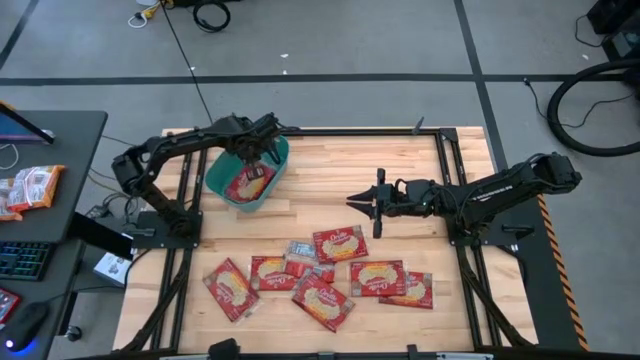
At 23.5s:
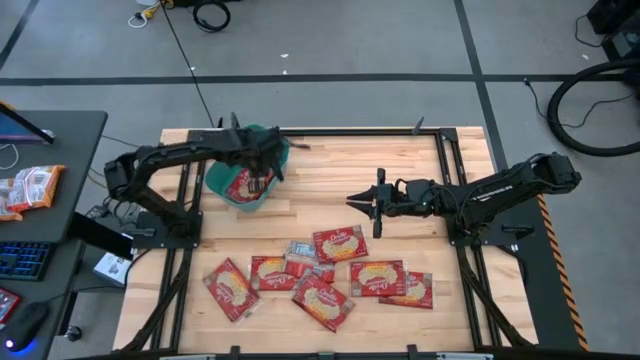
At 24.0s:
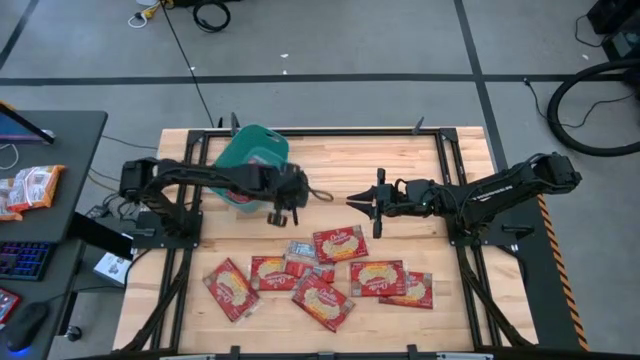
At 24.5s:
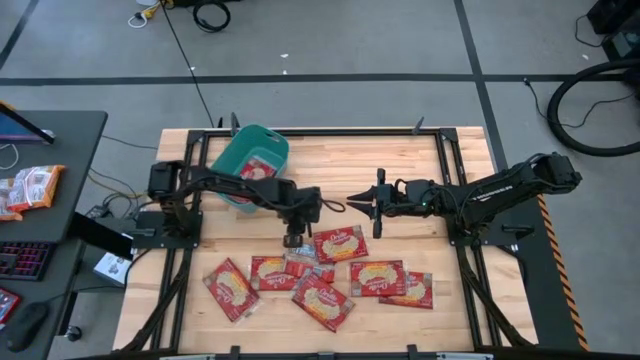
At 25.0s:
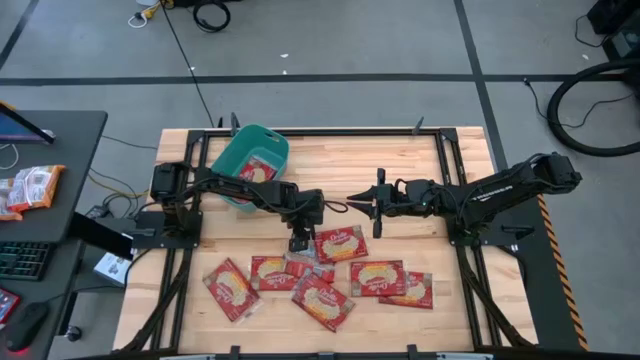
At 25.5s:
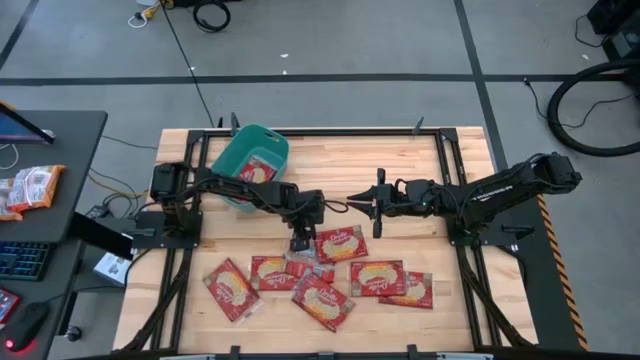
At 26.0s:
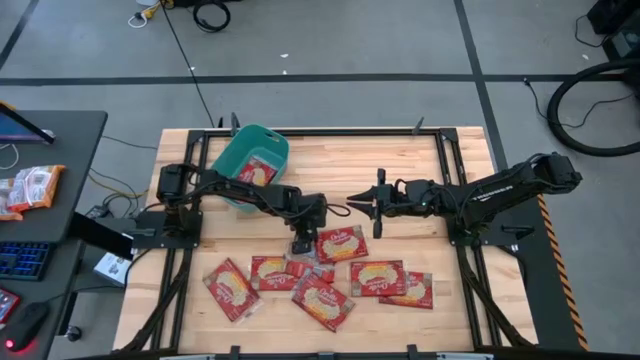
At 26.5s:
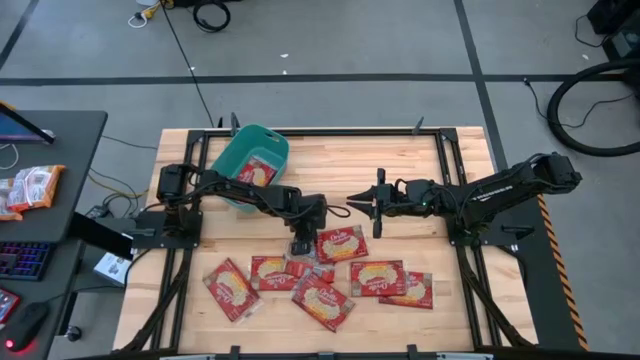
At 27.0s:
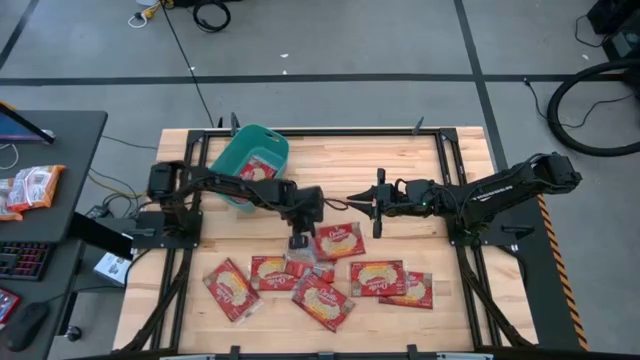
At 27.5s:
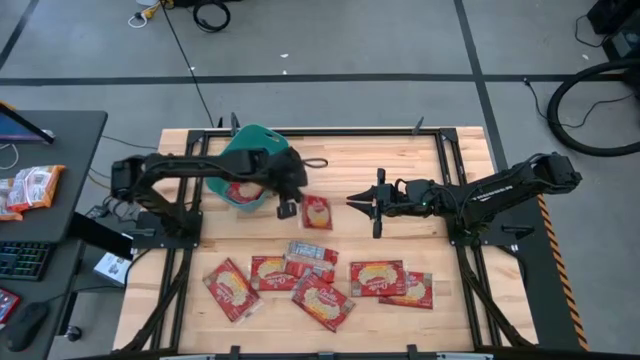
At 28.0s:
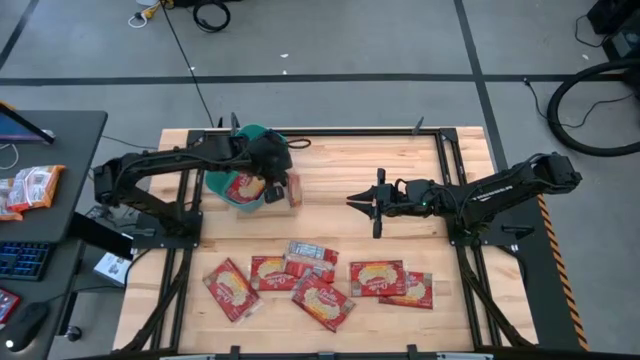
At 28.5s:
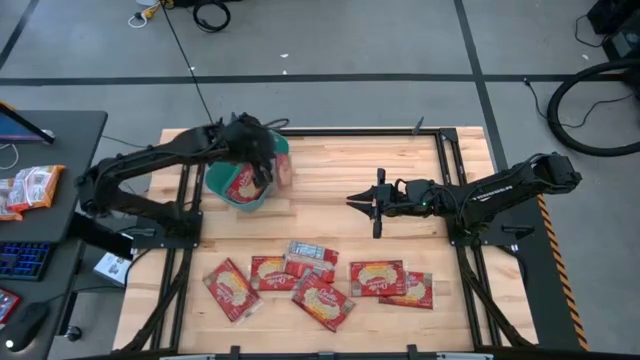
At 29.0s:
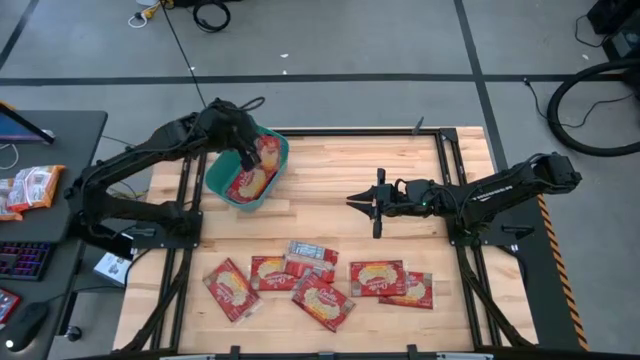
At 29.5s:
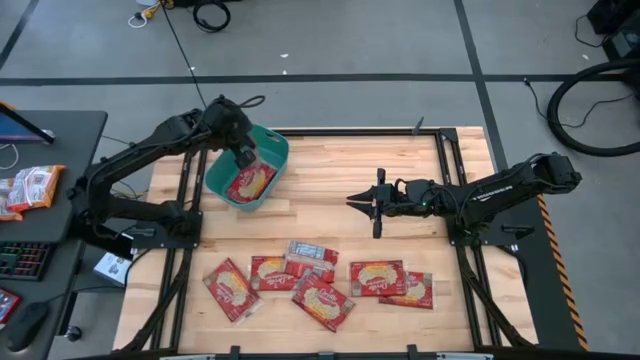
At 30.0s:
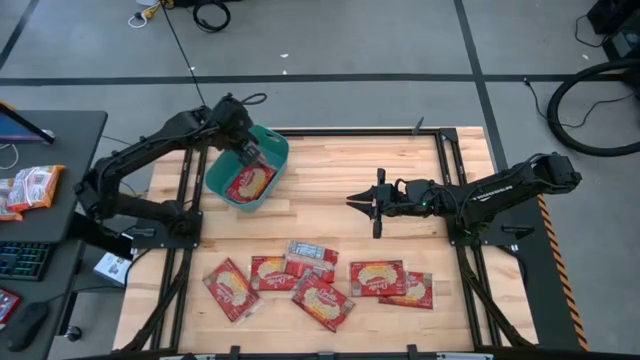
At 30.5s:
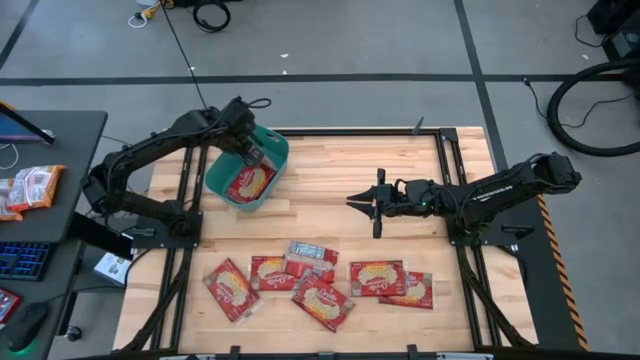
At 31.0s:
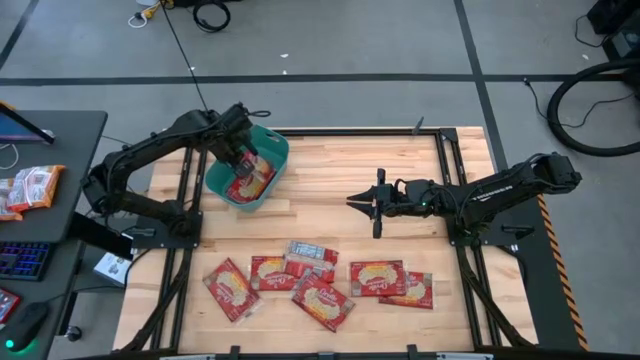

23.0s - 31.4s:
Task: Sort popcorn bags into baskets
Put the red popcorn bag into the green bin

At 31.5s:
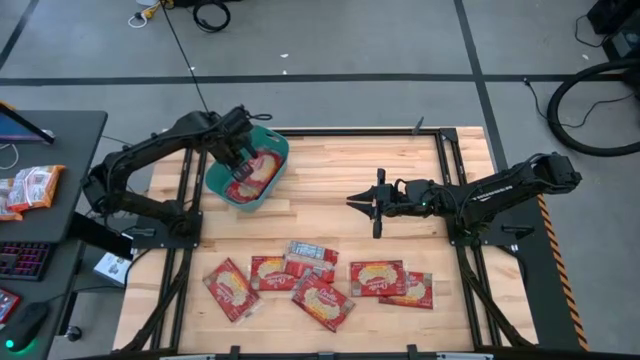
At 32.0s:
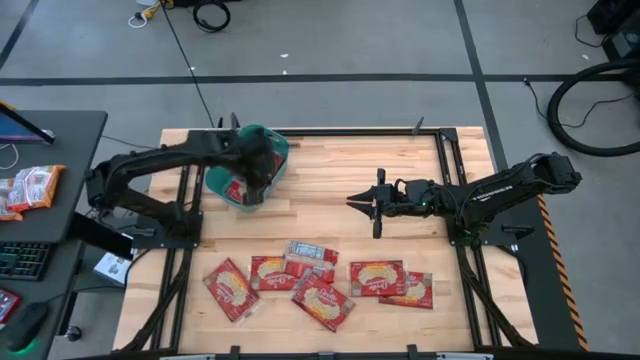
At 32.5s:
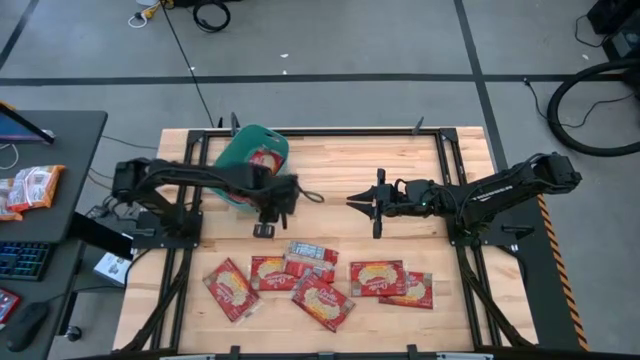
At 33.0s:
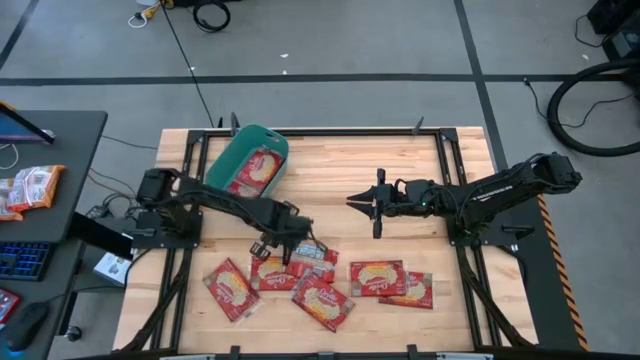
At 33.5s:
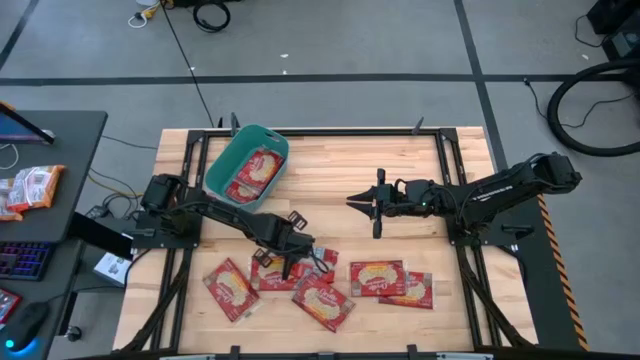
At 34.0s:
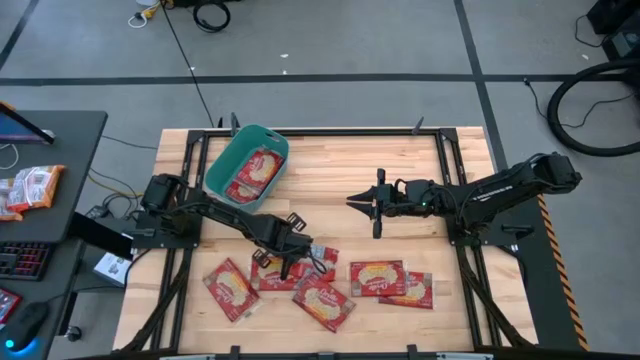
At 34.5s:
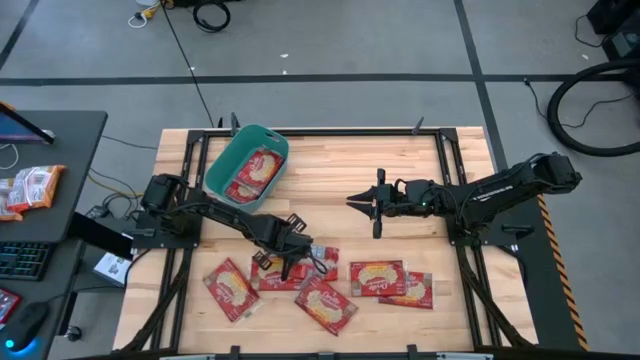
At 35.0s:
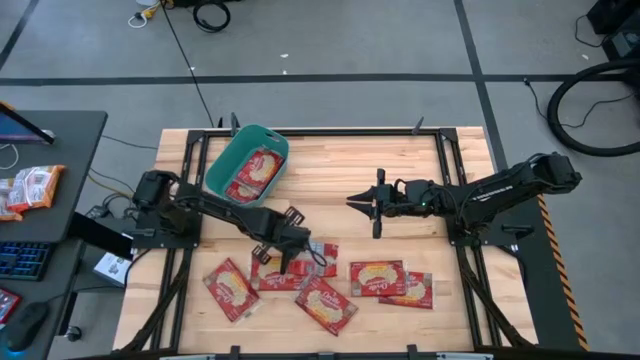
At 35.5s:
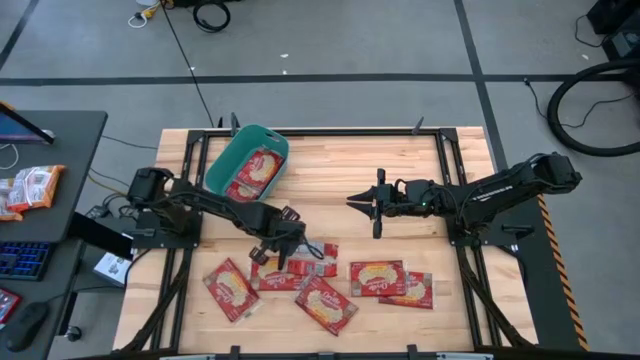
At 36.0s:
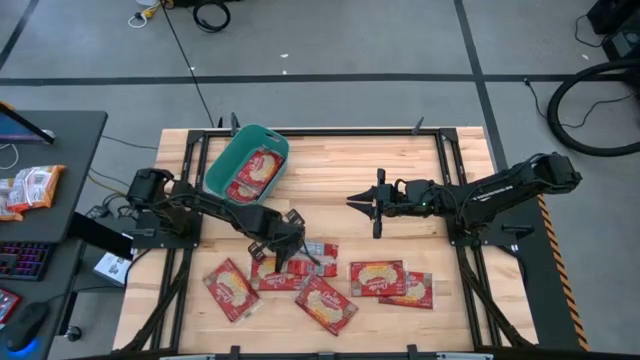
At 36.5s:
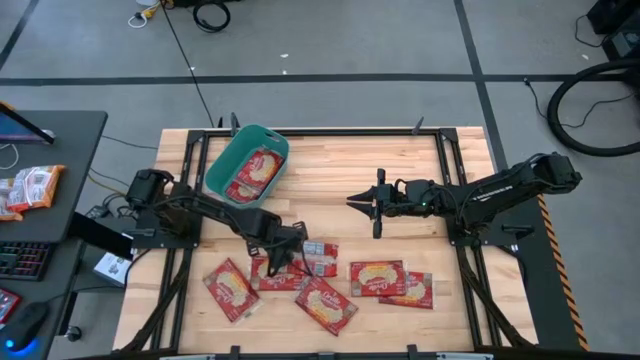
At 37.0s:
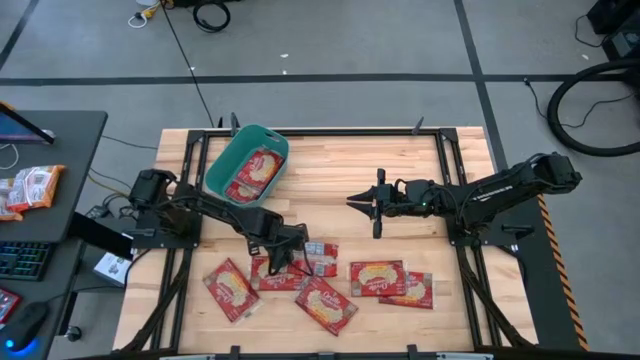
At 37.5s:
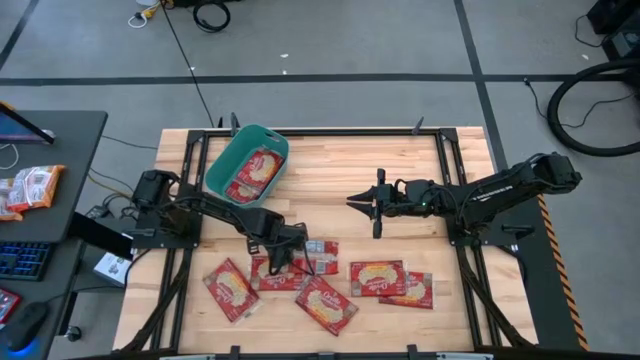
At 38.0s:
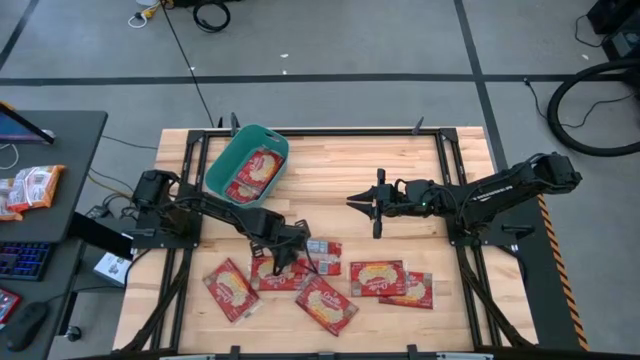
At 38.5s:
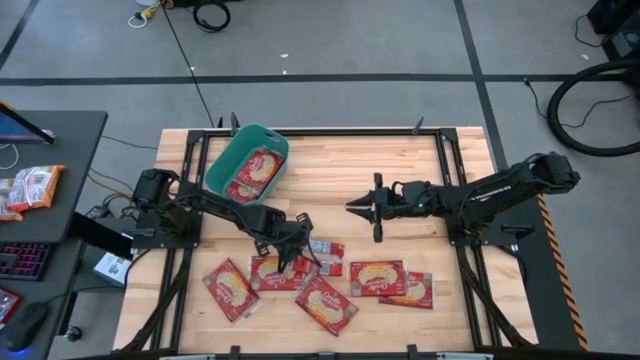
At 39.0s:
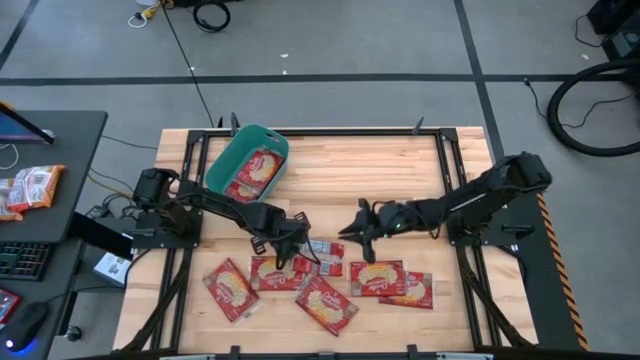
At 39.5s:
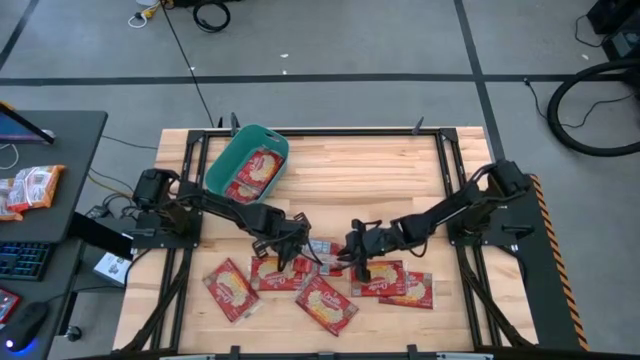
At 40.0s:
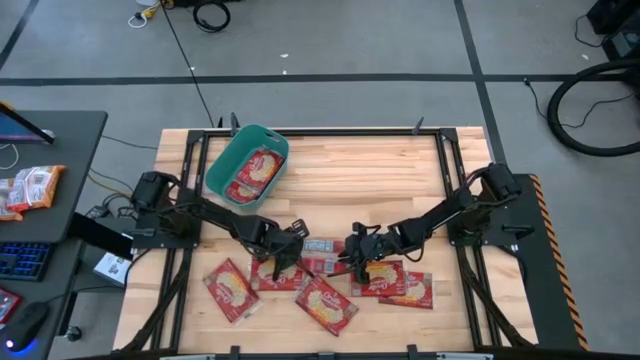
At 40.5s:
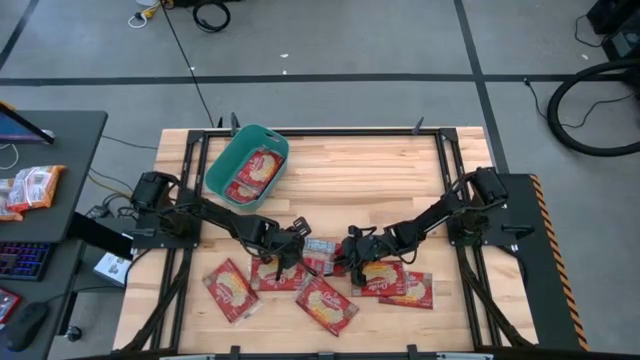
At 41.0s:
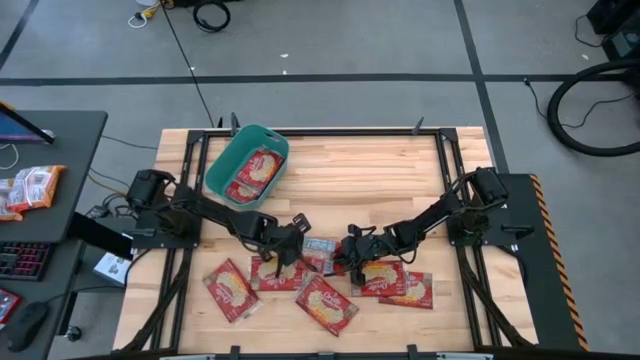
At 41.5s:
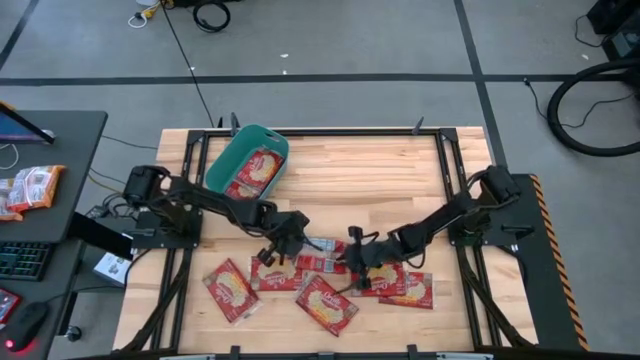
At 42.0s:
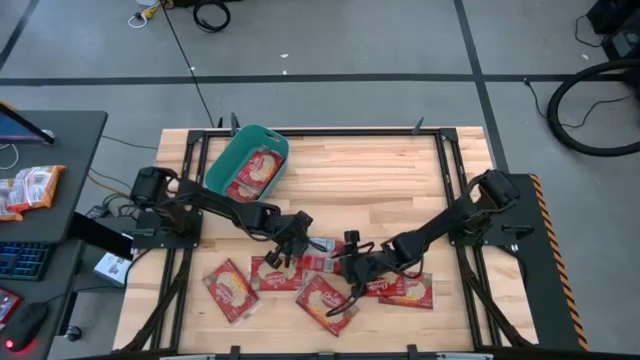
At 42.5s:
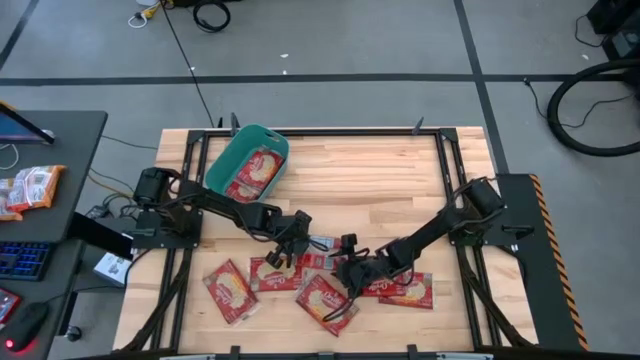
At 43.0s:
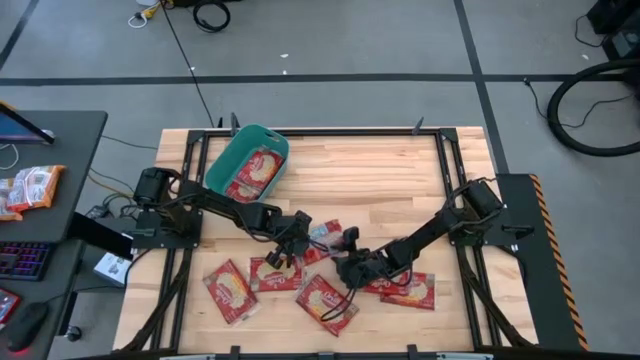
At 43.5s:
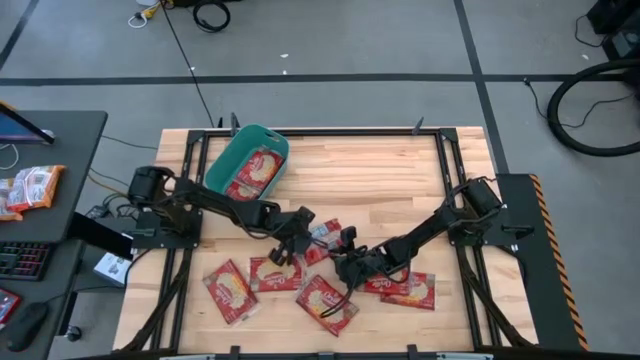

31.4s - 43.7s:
Put the red popcorn bag into the green bin
